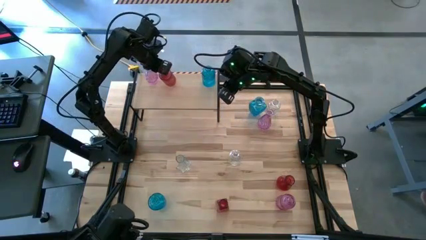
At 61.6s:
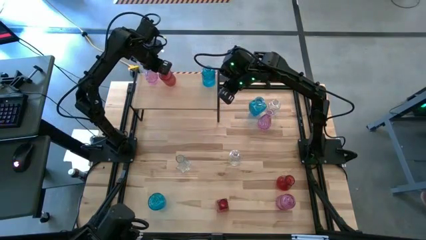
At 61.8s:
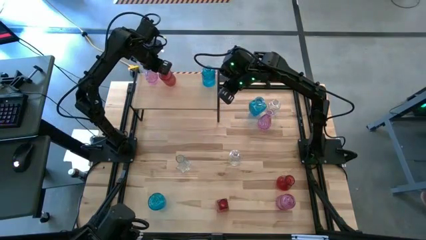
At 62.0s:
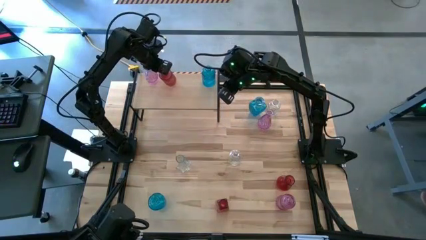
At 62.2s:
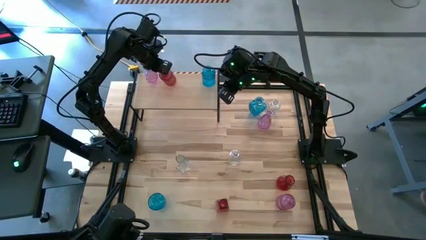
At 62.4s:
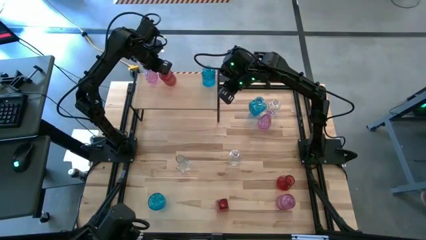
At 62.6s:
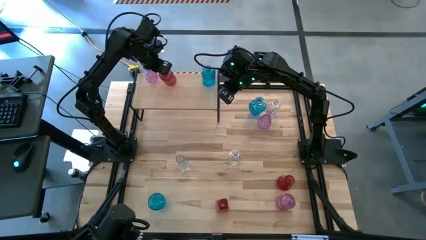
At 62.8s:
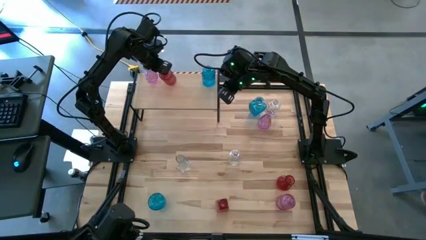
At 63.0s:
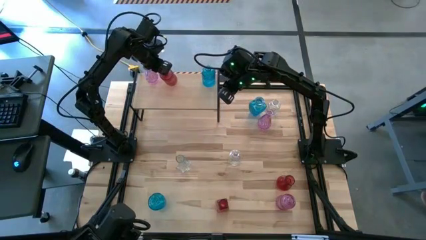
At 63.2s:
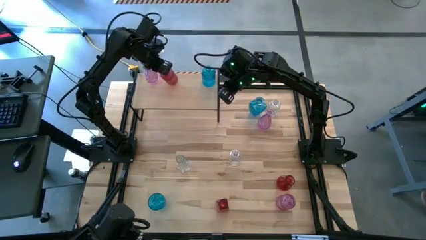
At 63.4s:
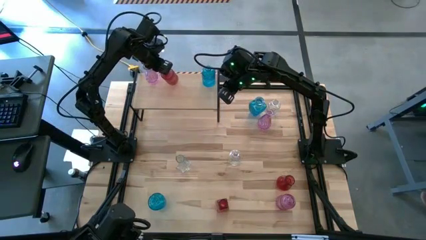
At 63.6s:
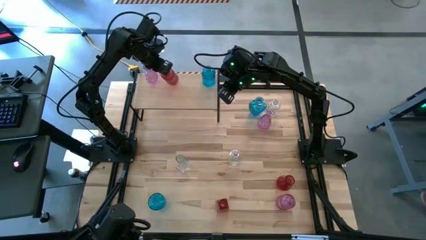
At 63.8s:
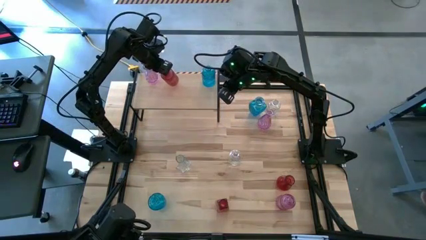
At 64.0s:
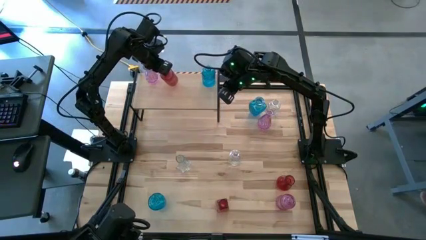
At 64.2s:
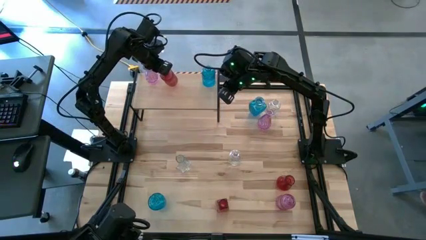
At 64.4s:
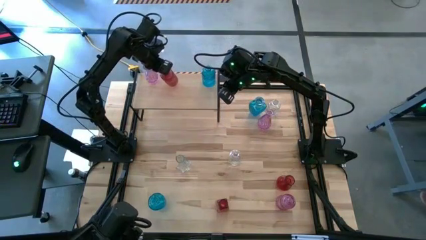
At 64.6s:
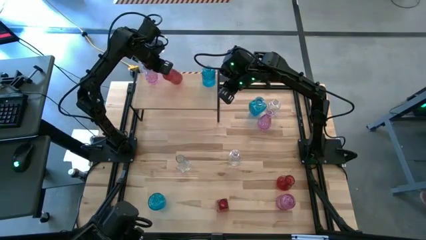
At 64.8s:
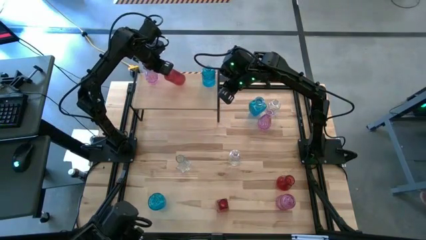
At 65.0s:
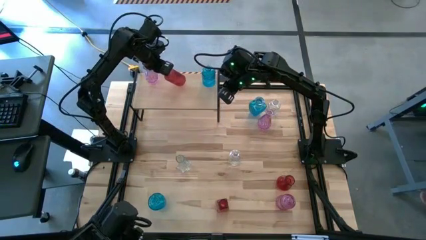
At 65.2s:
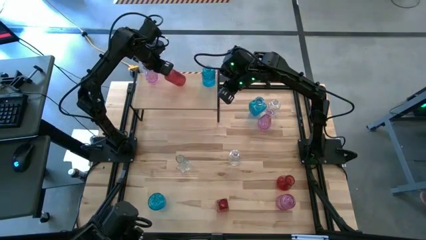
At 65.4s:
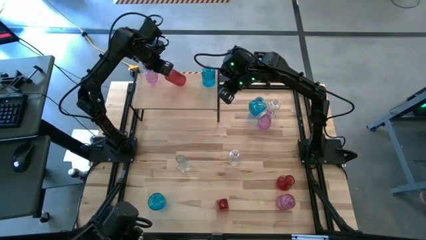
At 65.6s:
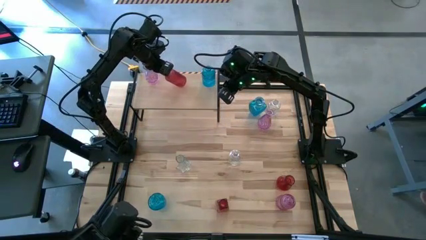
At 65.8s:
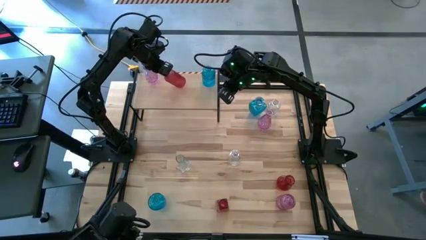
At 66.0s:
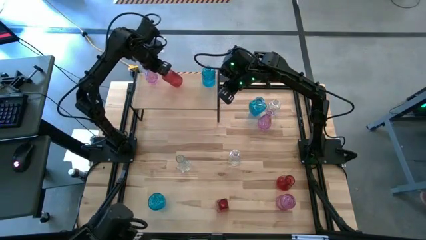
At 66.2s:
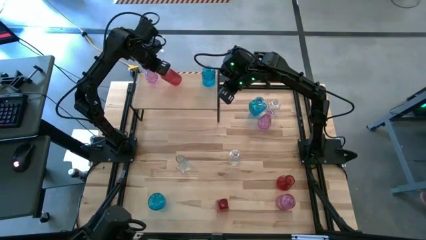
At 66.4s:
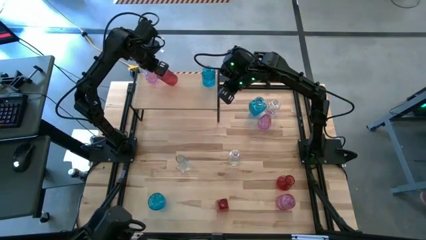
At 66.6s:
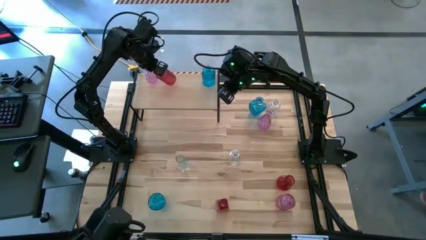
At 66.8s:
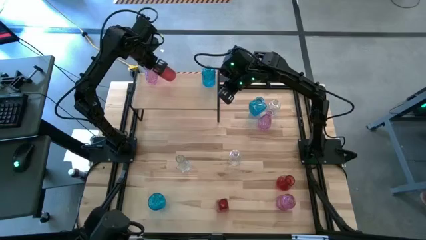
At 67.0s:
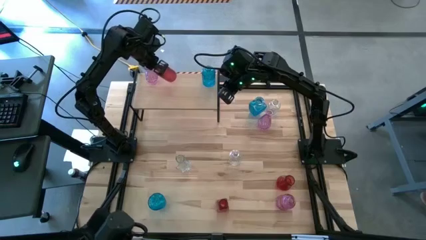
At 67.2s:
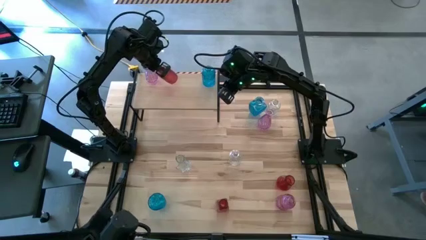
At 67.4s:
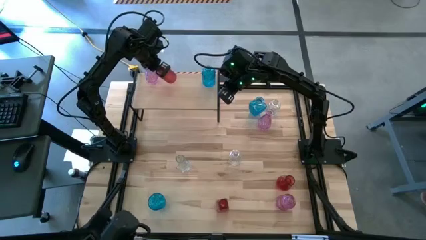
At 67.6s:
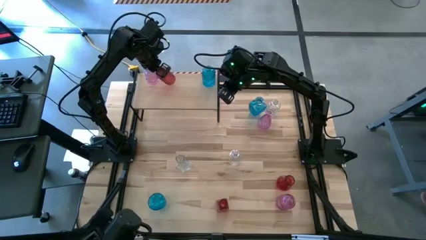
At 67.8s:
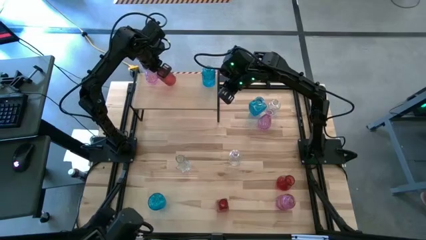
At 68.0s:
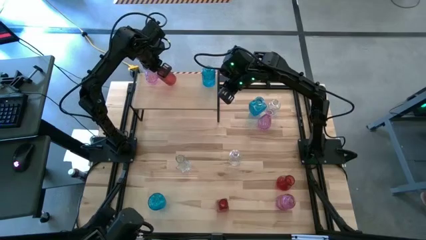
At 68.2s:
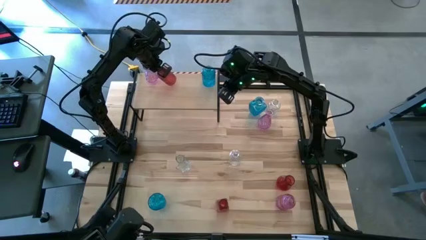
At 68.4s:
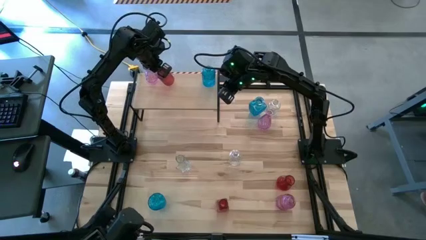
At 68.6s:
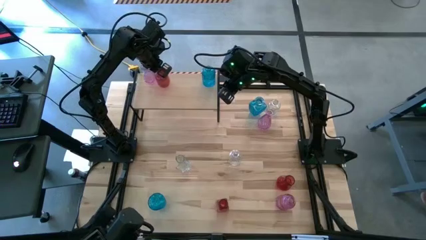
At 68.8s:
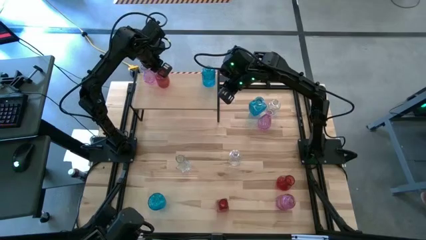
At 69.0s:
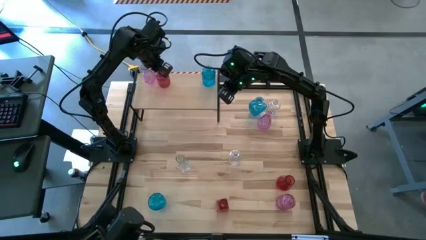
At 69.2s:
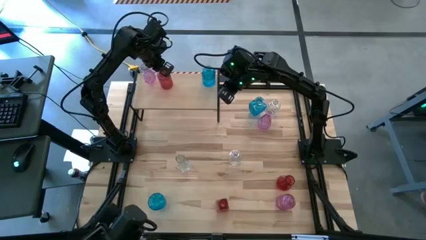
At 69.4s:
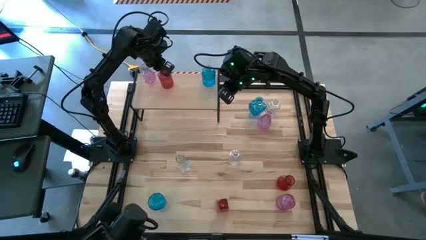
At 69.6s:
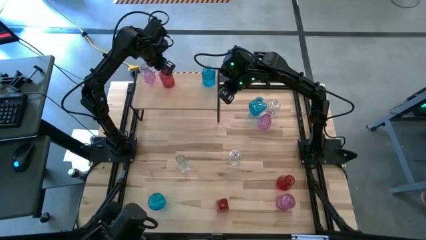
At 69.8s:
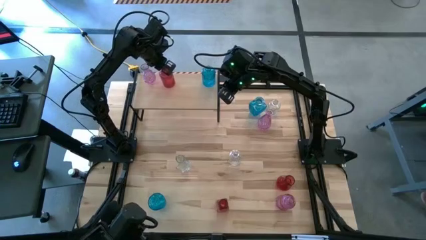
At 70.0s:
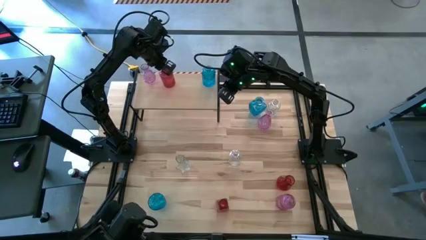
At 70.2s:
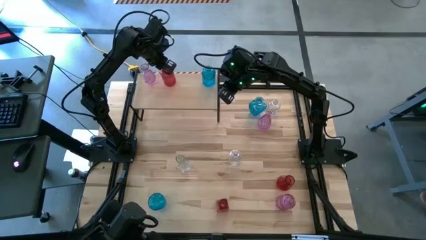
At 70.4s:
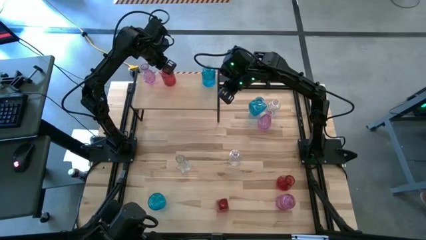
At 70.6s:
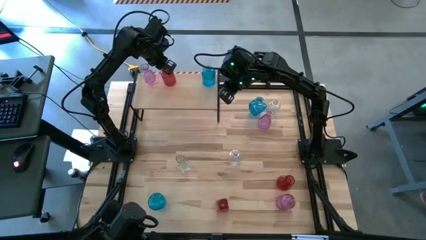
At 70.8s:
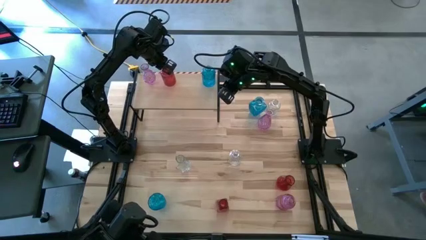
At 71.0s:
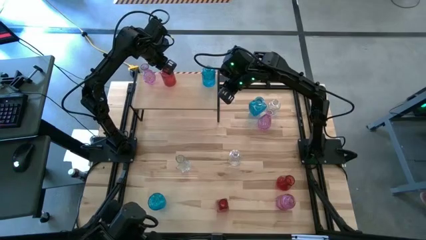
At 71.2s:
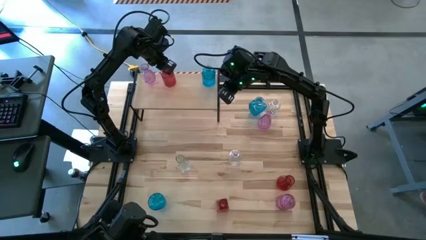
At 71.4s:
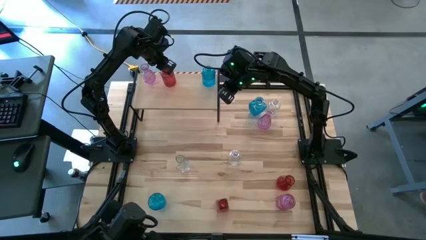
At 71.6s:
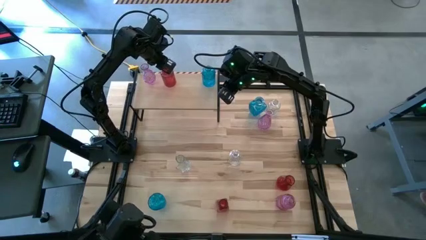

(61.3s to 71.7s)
Task: sort vases onto shelf
Put the top left red vase on the shelf

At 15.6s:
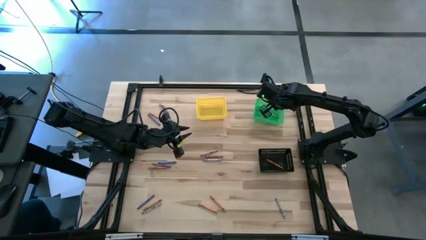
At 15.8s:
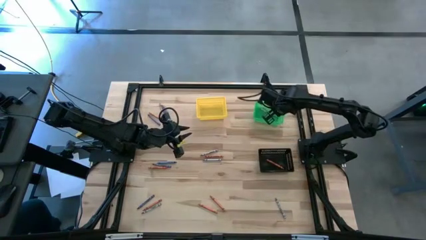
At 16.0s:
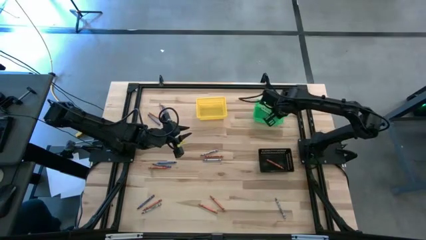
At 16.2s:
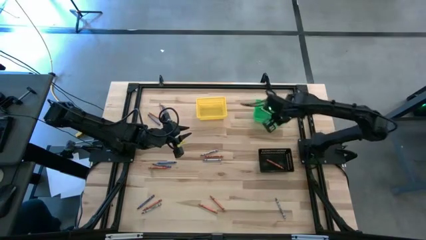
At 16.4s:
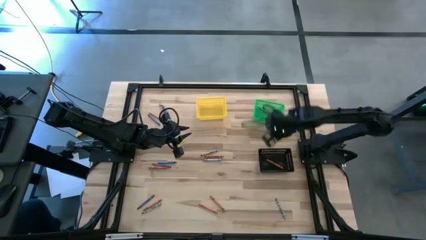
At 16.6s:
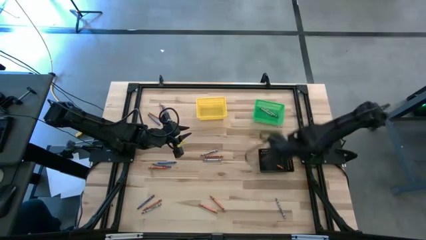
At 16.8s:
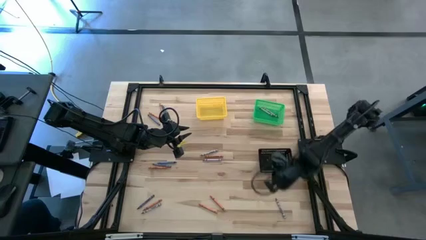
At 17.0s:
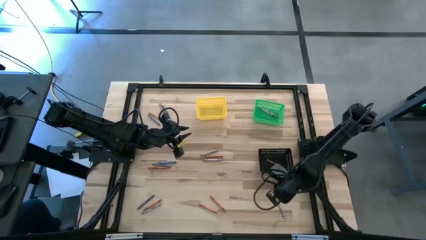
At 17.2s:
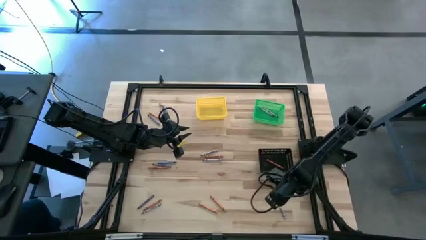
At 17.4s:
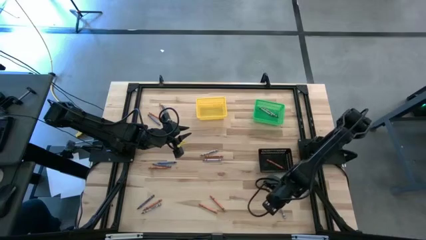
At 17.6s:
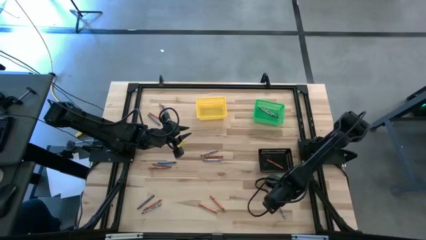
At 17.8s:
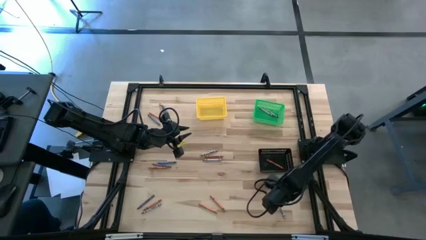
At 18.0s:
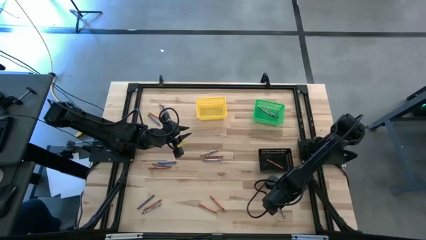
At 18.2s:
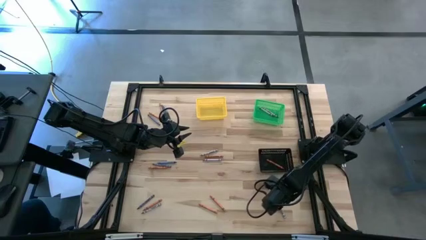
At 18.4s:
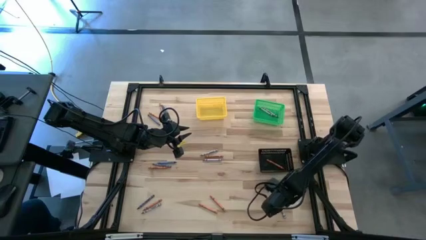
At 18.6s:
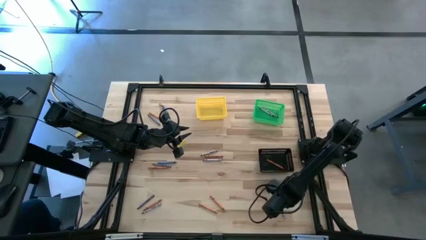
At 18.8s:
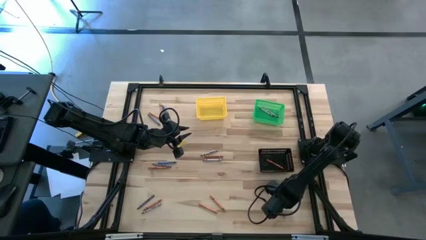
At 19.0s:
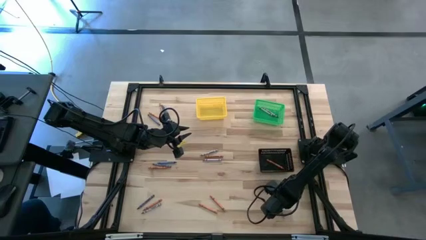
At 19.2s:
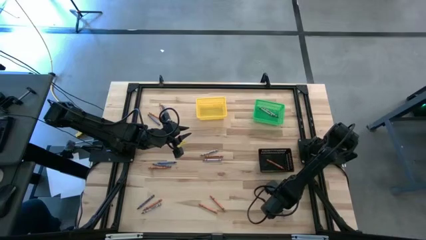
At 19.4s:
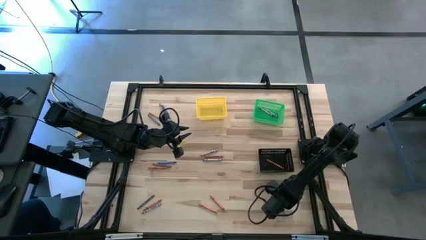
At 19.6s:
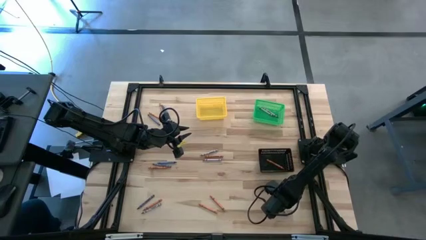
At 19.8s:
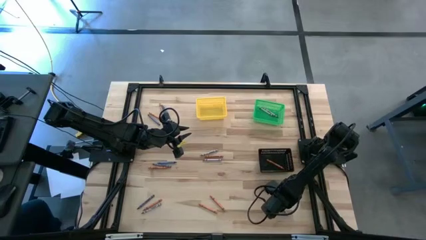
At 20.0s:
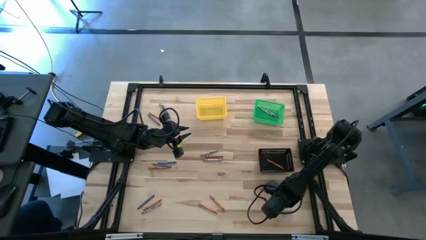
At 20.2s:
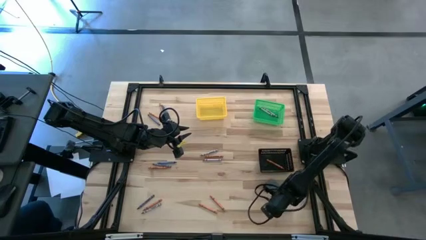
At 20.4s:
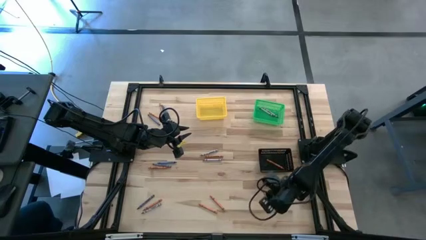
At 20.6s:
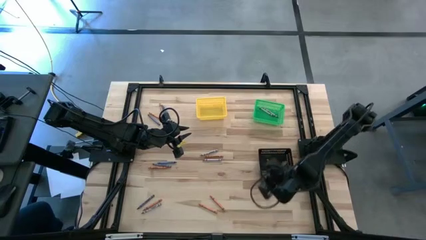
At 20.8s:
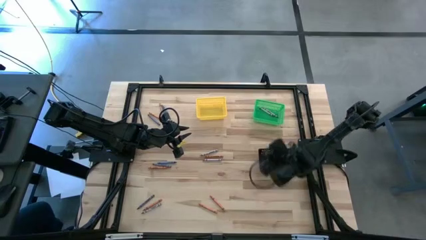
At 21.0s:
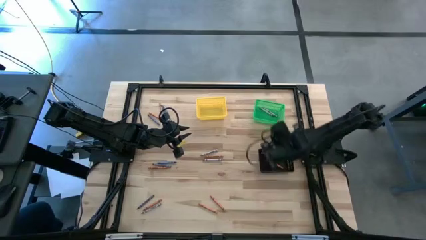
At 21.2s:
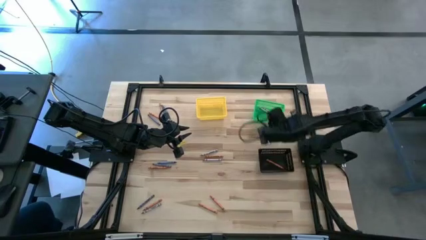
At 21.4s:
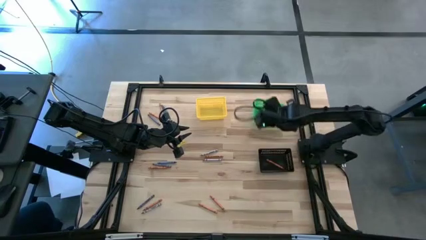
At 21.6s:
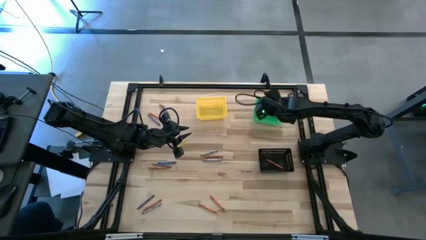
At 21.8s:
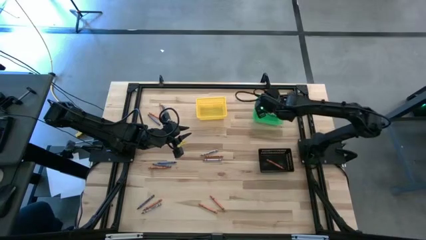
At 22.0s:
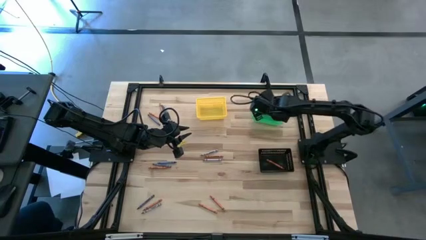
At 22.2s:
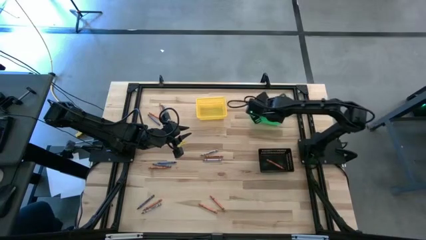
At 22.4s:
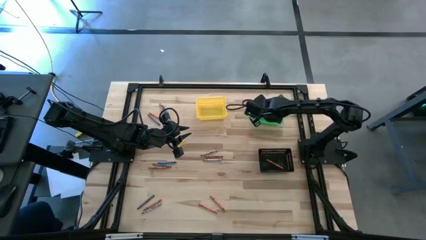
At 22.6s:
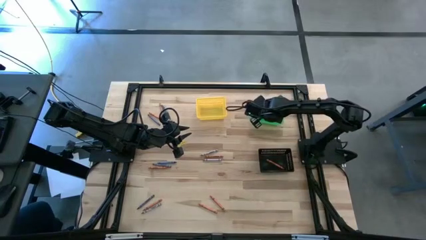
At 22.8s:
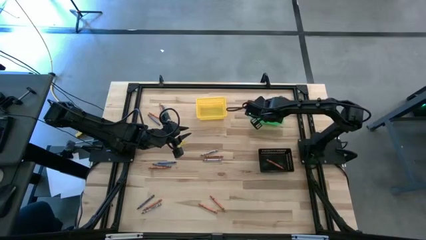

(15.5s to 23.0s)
Task: Sort crayons
Put the gray crayon into the green basket
